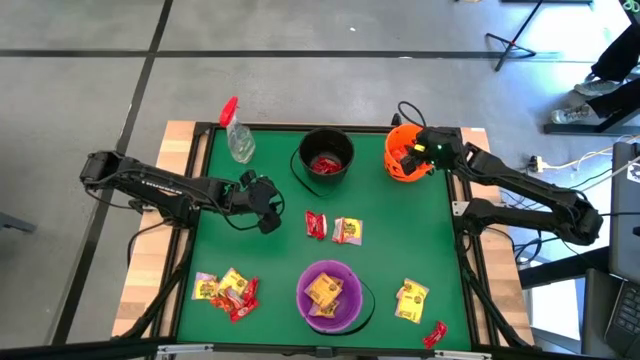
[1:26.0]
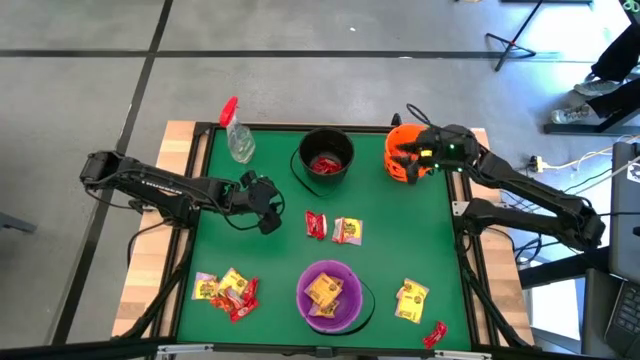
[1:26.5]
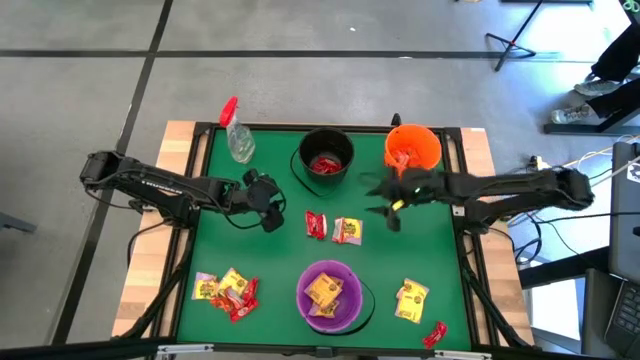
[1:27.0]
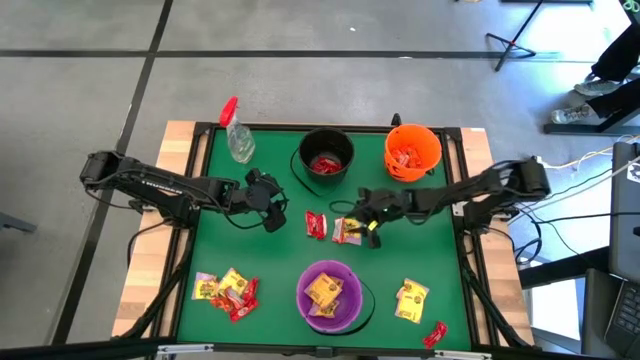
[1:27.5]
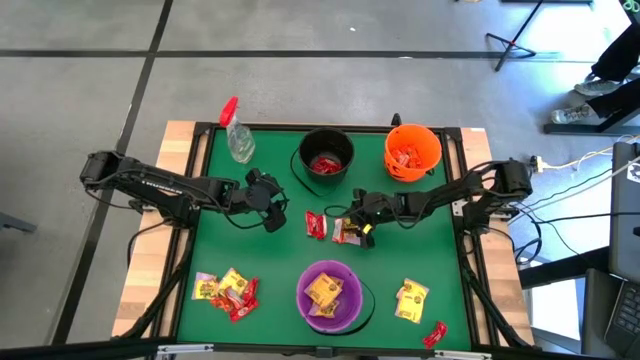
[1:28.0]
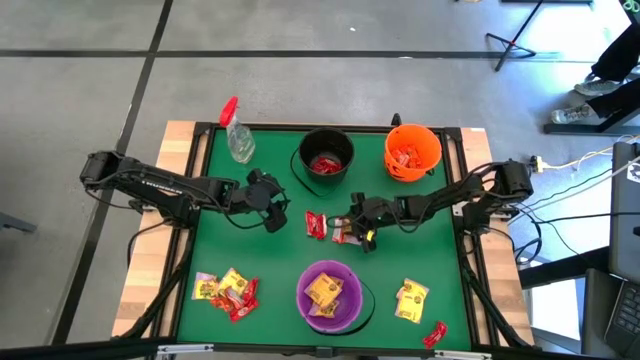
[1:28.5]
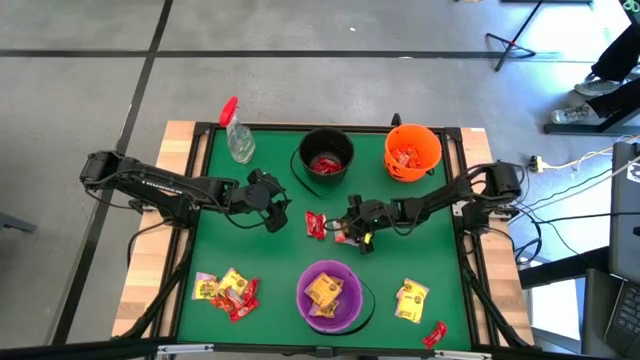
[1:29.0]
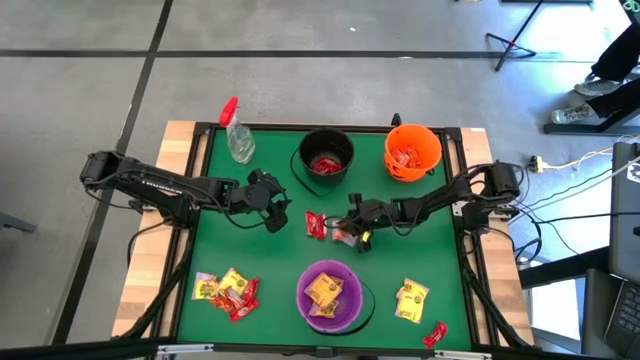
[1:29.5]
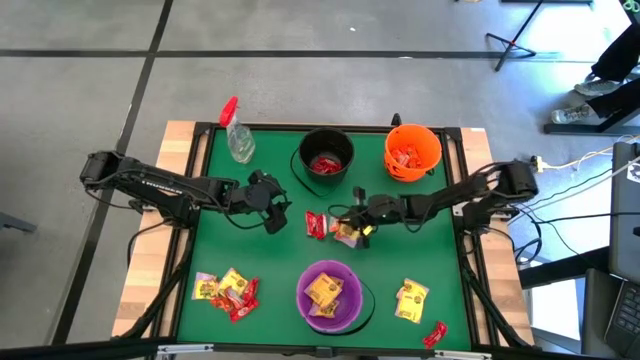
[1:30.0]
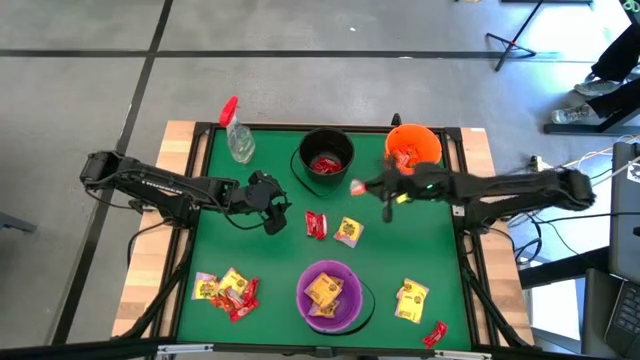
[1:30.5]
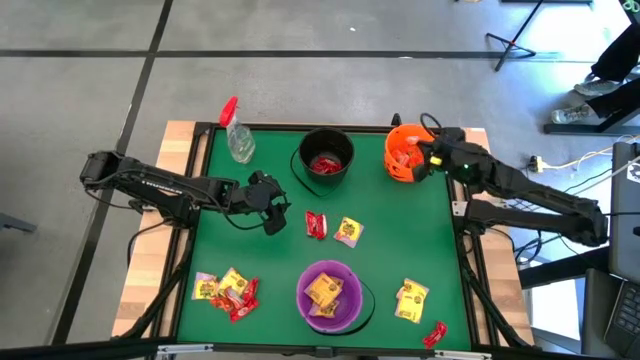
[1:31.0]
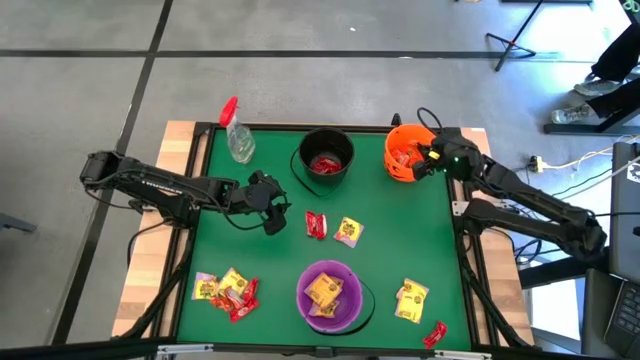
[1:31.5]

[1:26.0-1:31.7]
Task: Organize candy in baskets
Put the top orange candy pack into the orange bucket

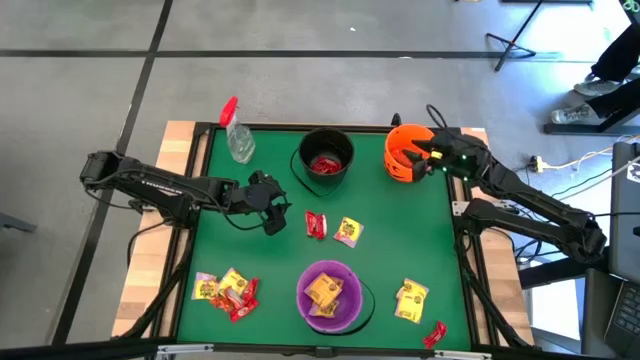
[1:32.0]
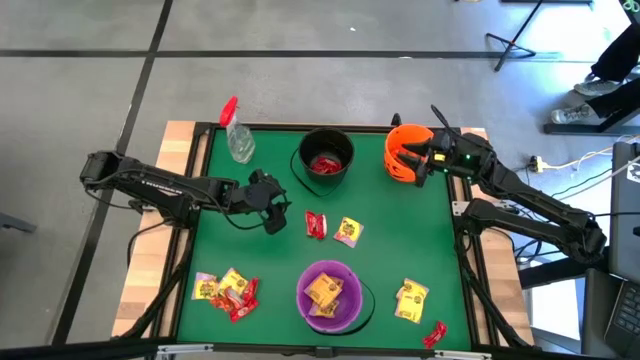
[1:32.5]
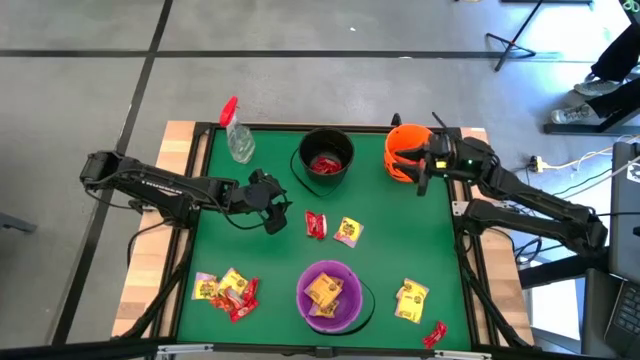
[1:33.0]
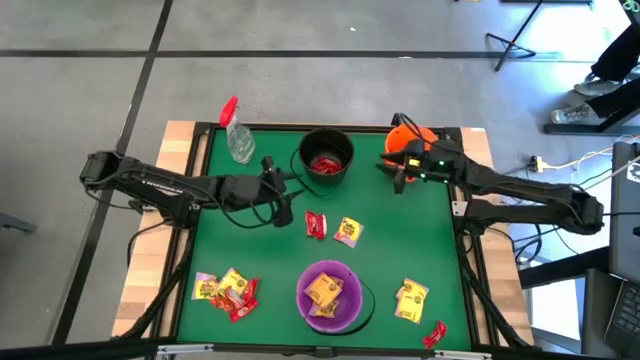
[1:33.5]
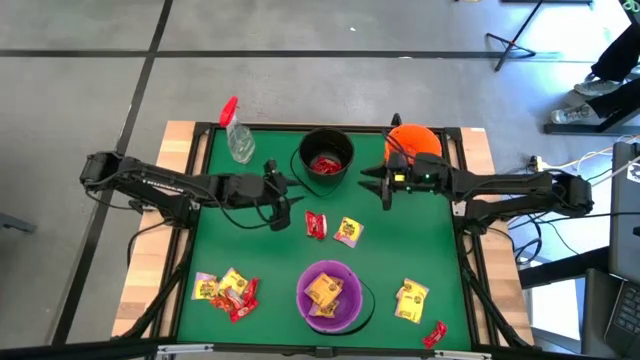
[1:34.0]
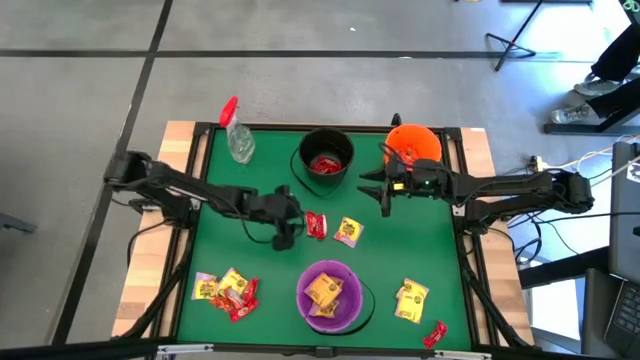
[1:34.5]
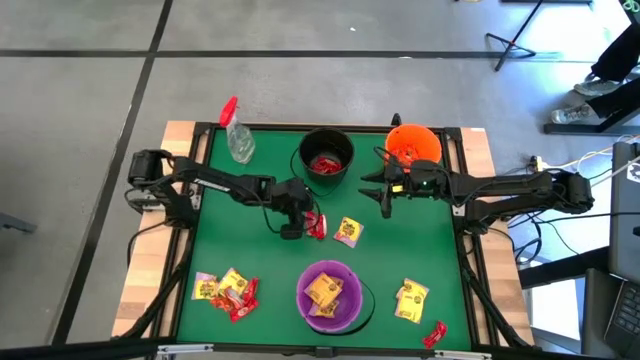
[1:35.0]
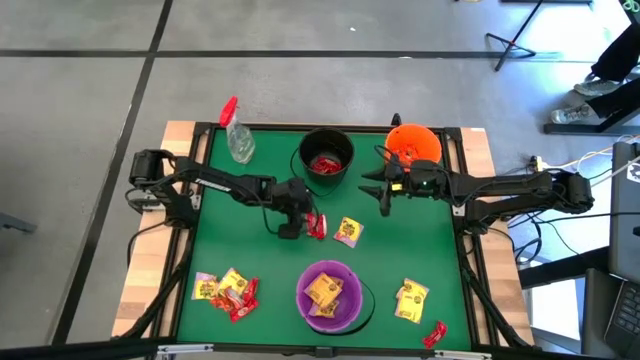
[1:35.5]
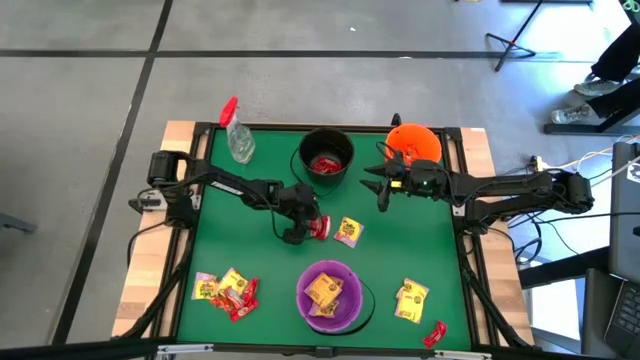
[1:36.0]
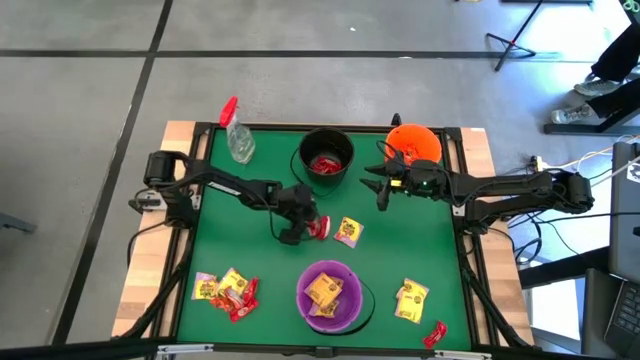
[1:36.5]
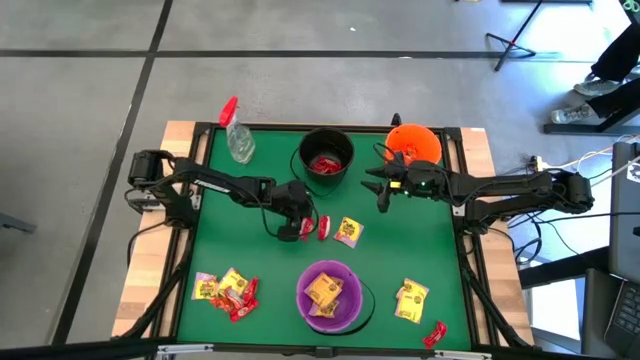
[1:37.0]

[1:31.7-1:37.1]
Put the red candy pack into the black bucket

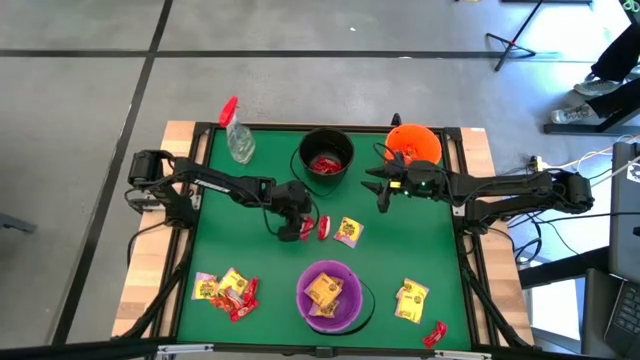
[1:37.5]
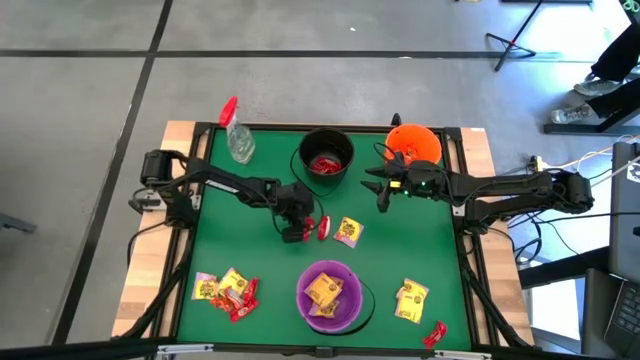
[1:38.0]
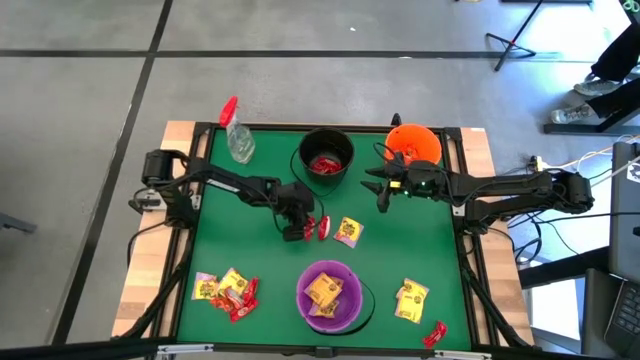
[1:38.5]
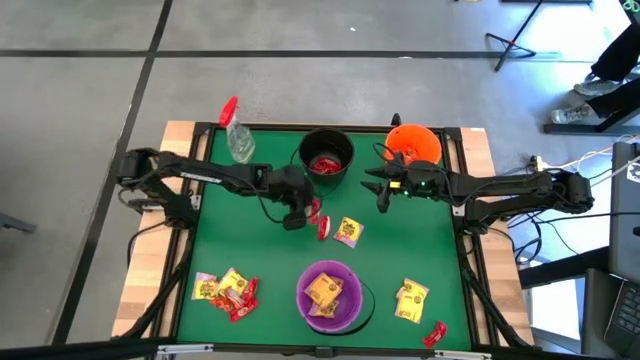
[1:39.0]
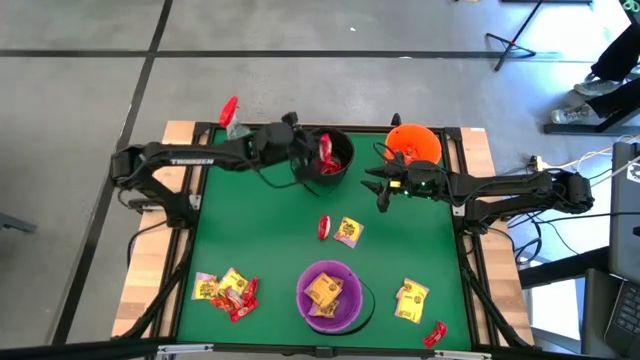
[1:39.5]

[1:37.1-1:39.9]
Put the red candy pack into the black bucket

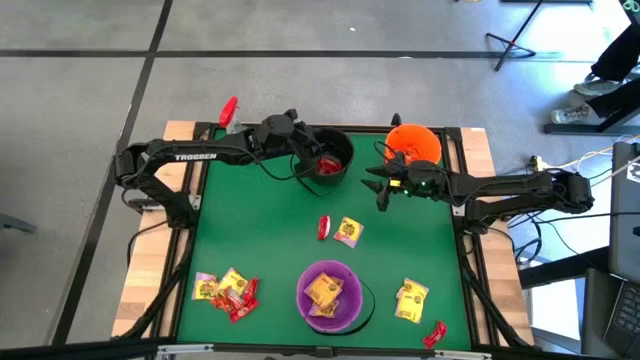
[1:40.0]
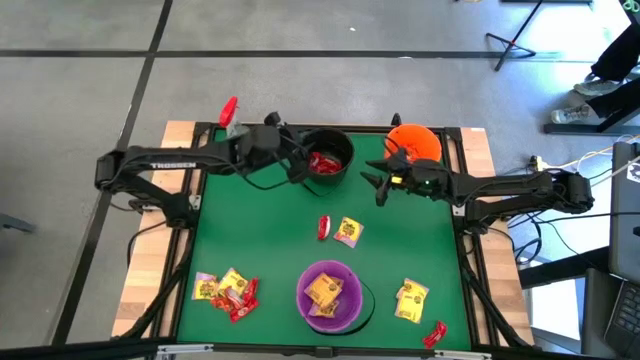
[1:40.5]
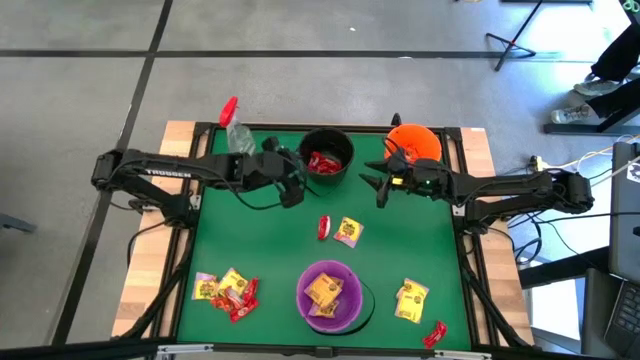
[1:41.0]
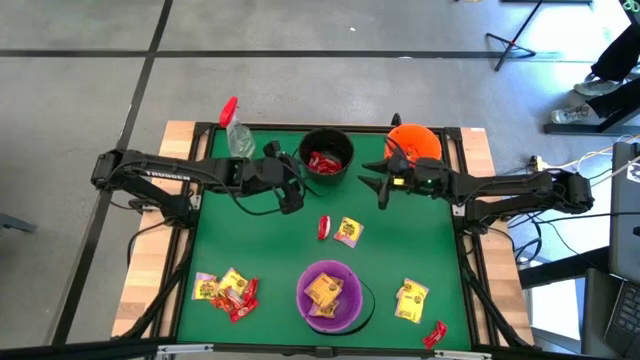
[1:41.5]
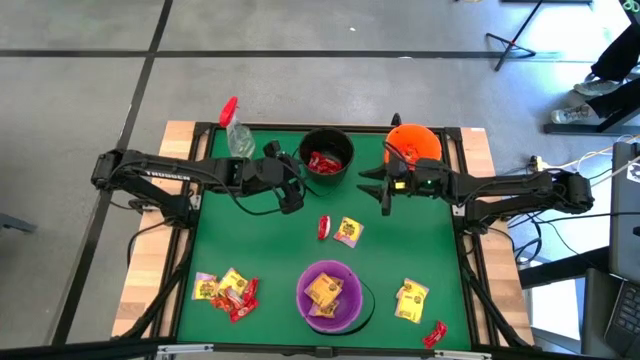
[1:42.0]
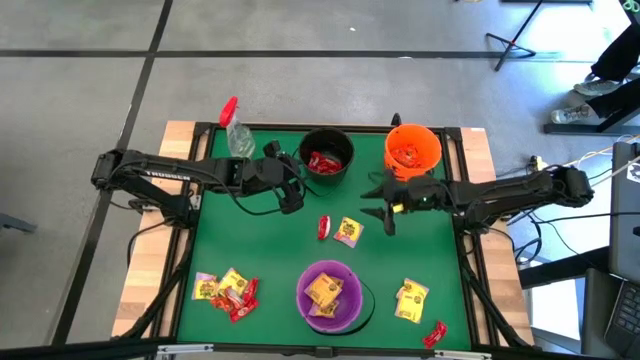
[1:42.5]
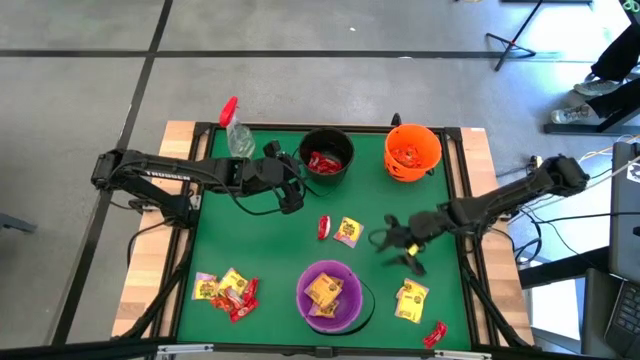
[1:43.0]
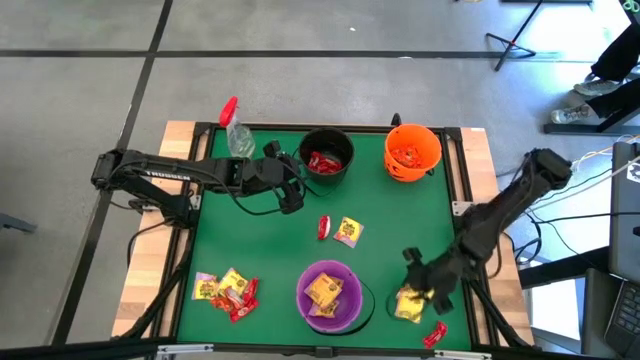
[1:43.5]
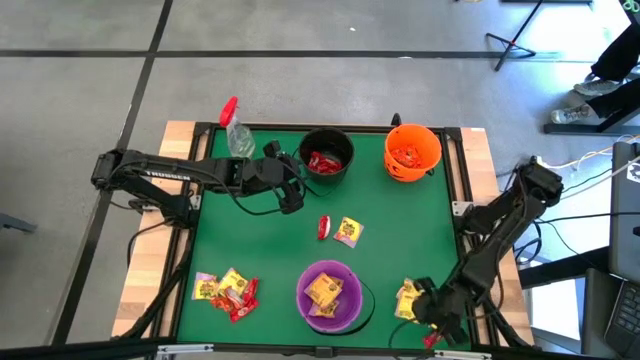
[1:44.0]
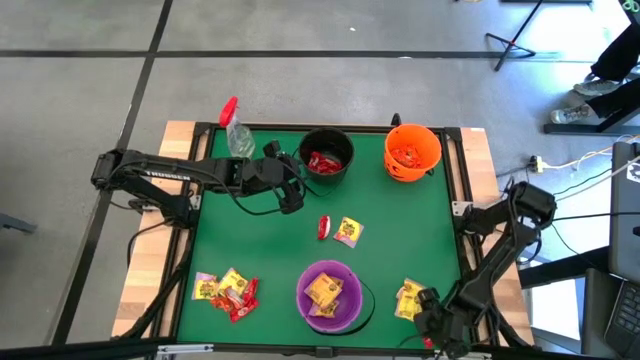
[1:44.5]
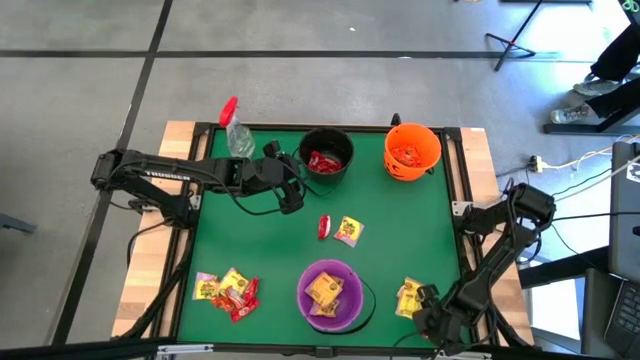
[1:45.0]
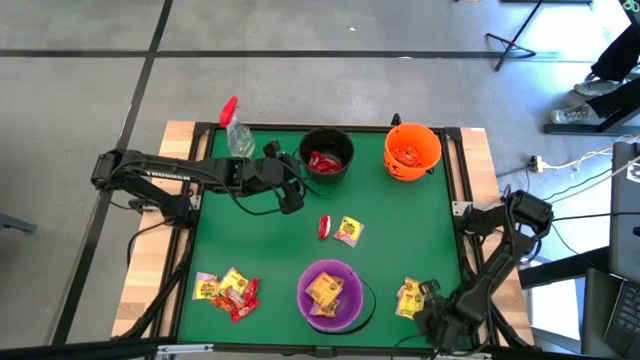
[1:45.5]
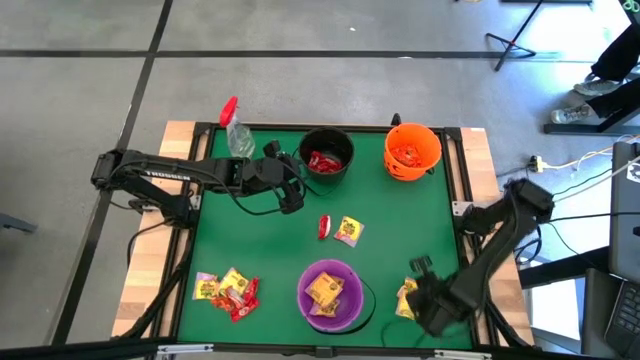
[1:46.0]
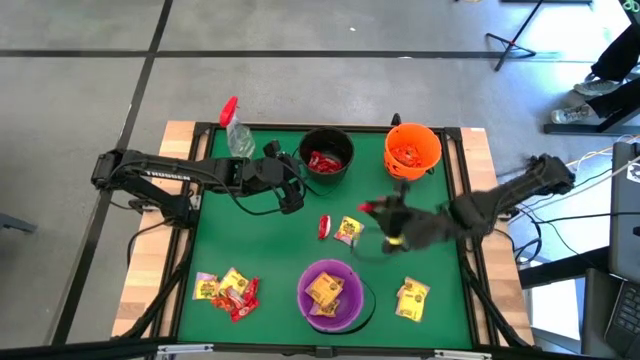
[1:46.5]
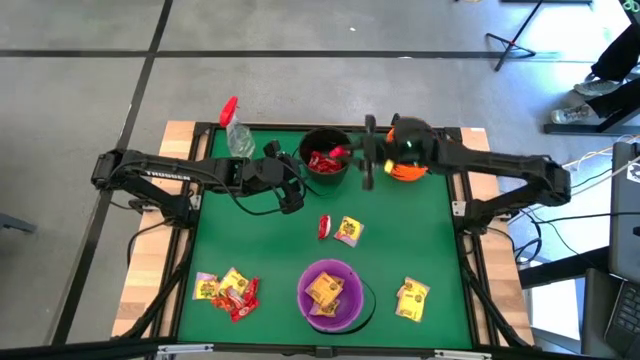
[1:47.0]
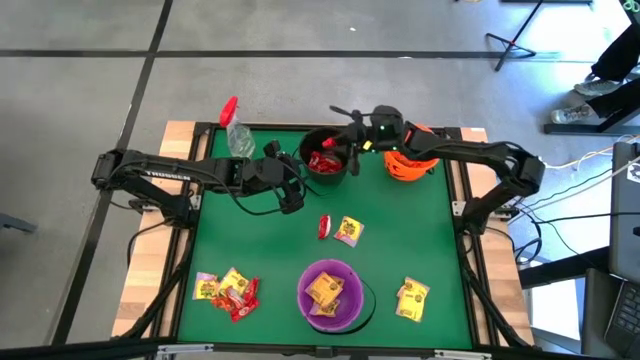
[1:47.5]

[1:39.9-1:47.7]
Put the red candy pack into the black bucket
